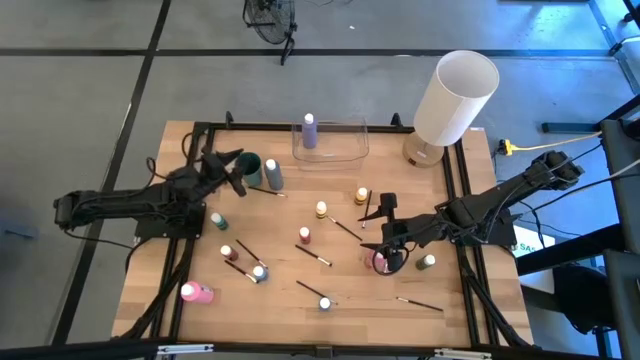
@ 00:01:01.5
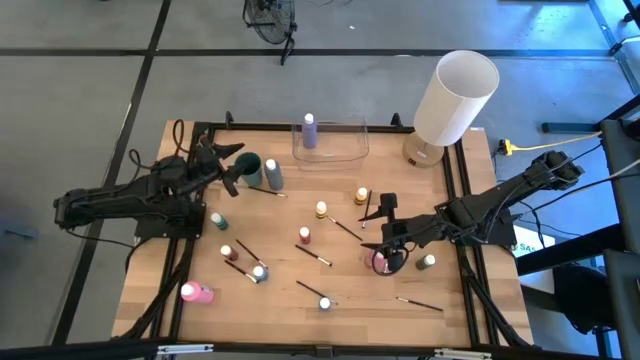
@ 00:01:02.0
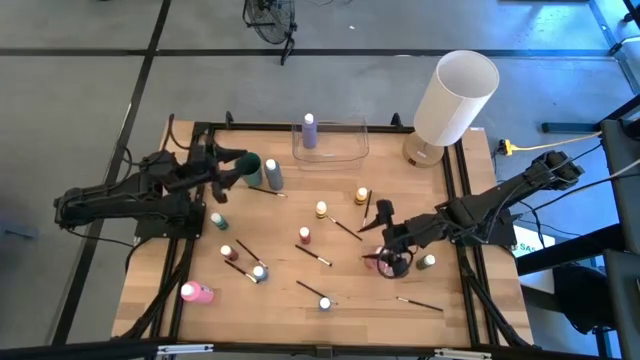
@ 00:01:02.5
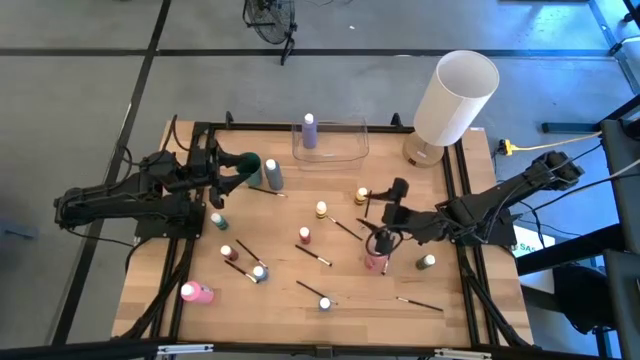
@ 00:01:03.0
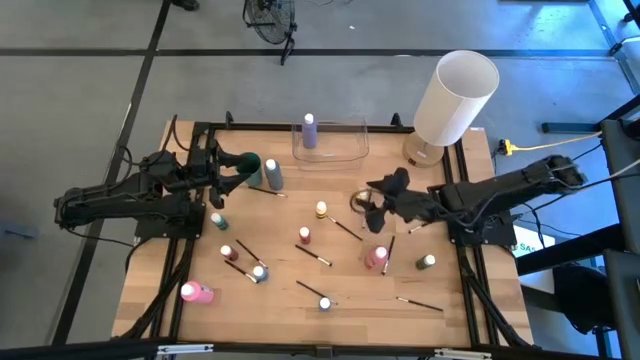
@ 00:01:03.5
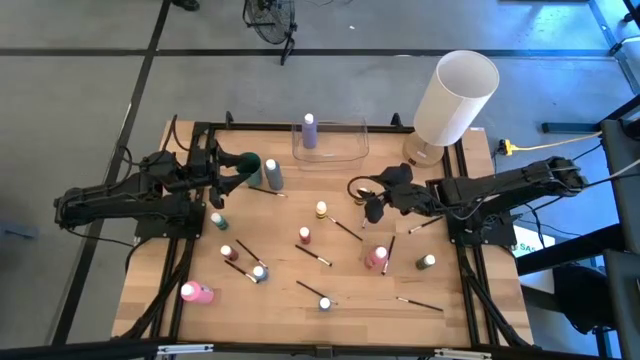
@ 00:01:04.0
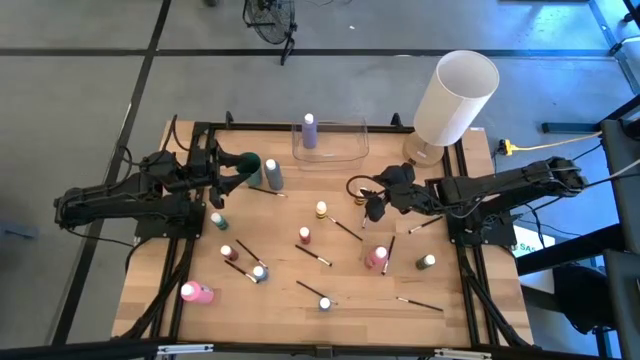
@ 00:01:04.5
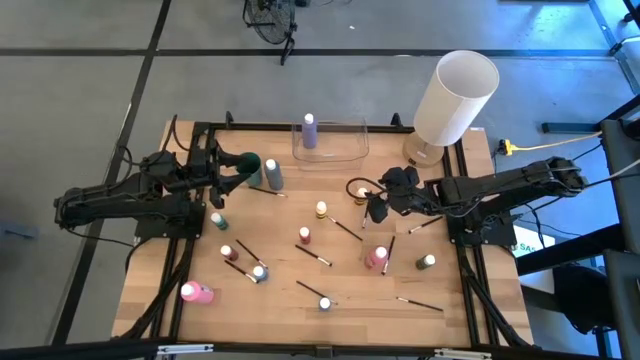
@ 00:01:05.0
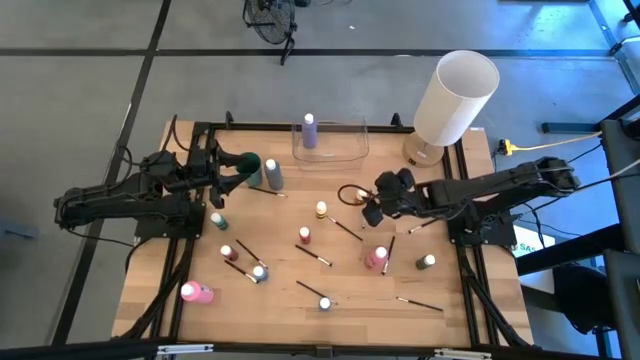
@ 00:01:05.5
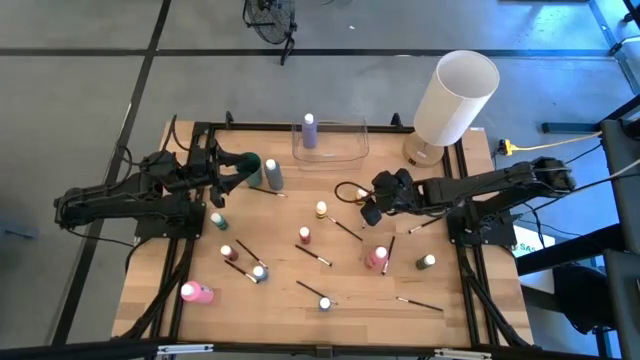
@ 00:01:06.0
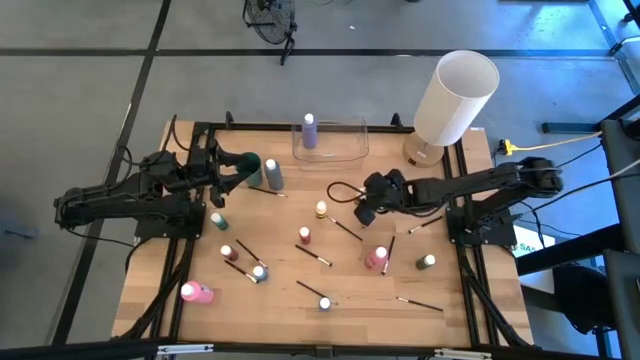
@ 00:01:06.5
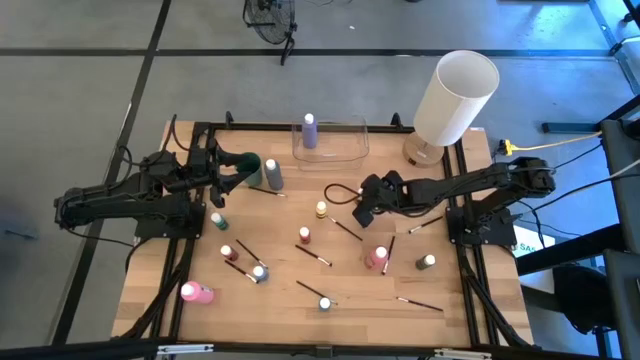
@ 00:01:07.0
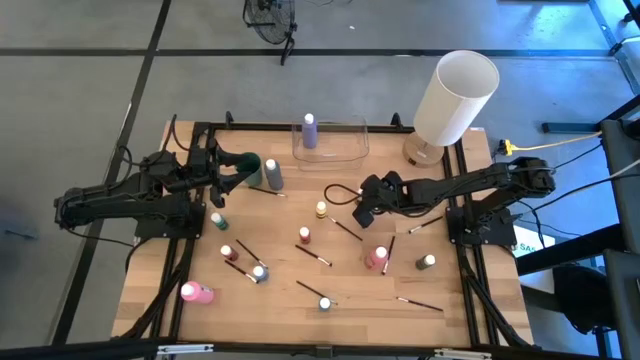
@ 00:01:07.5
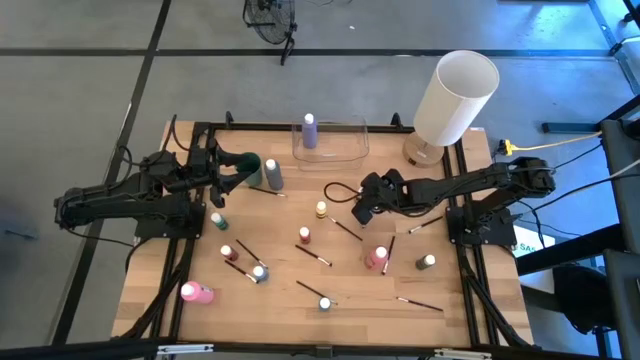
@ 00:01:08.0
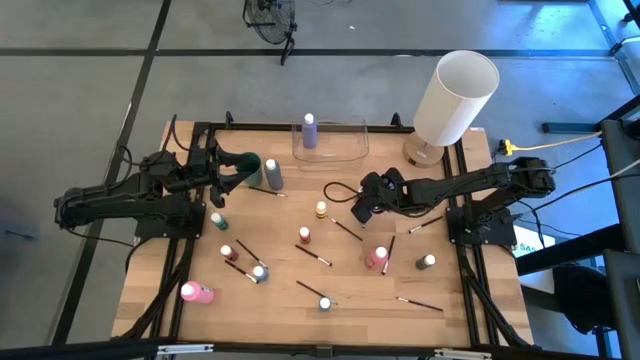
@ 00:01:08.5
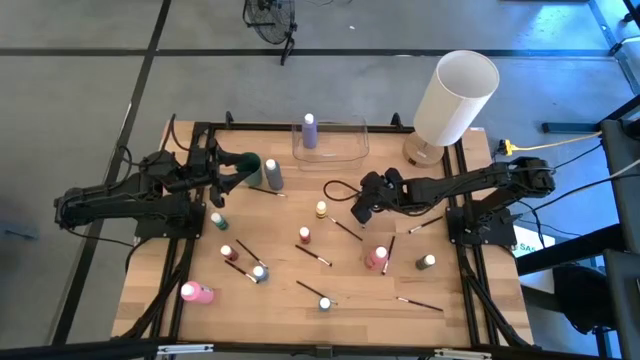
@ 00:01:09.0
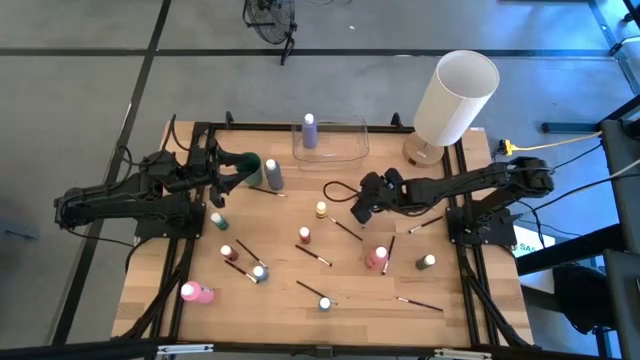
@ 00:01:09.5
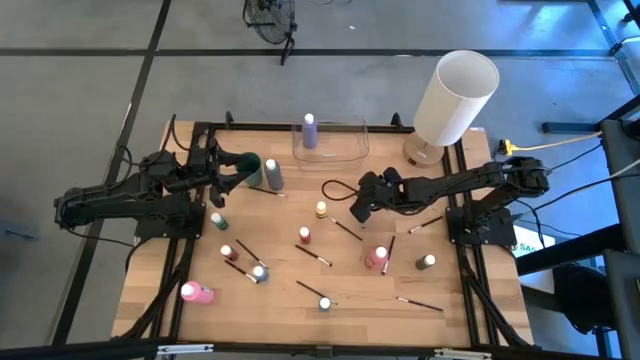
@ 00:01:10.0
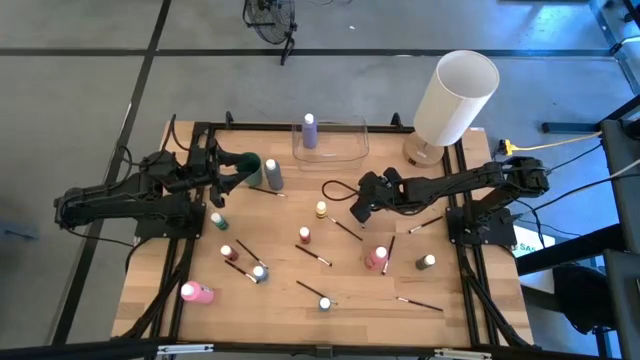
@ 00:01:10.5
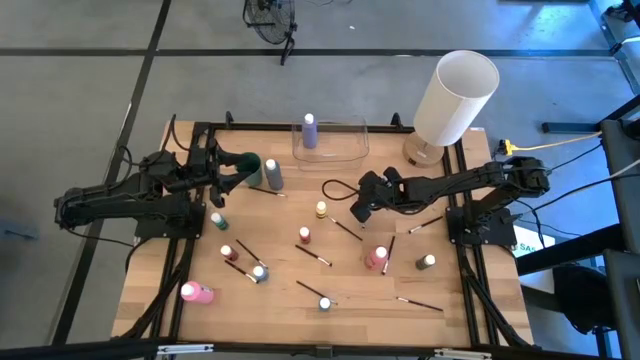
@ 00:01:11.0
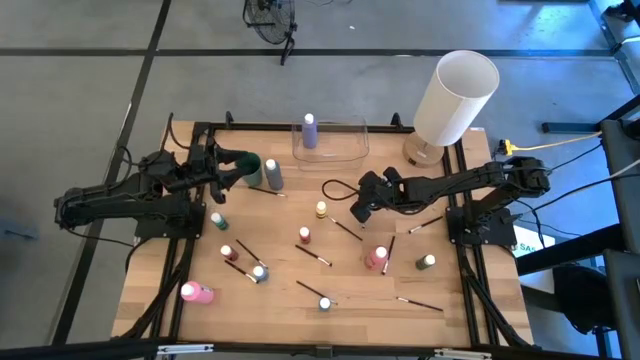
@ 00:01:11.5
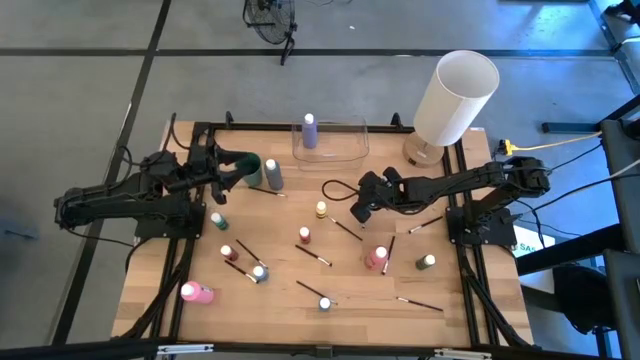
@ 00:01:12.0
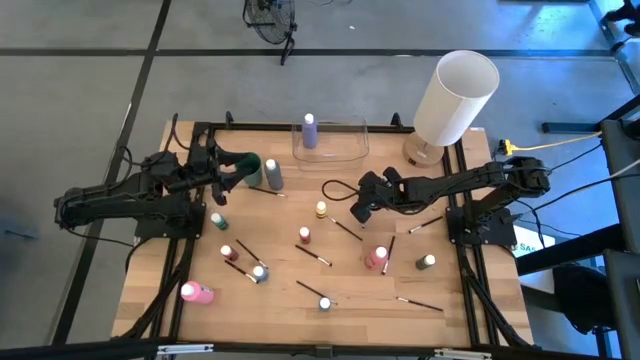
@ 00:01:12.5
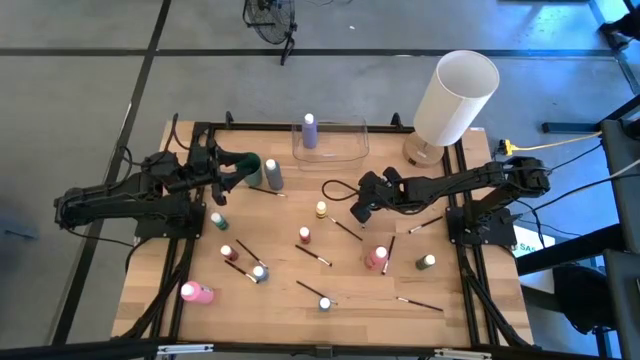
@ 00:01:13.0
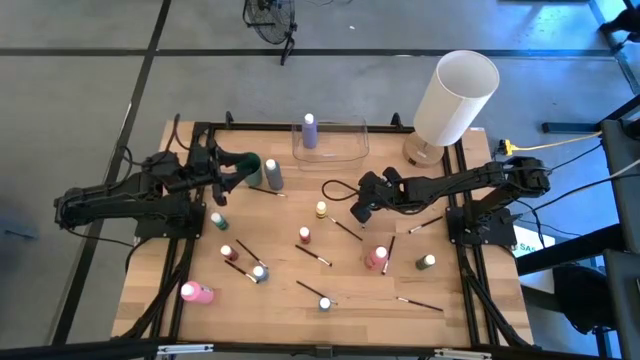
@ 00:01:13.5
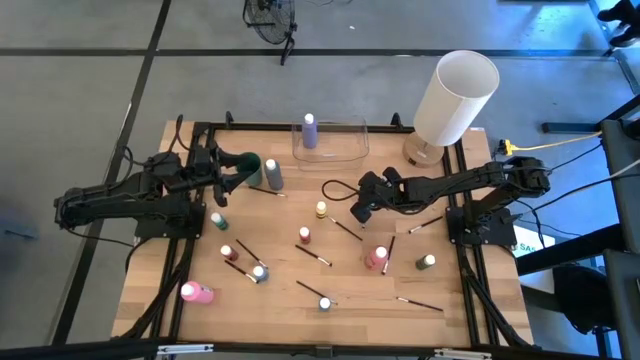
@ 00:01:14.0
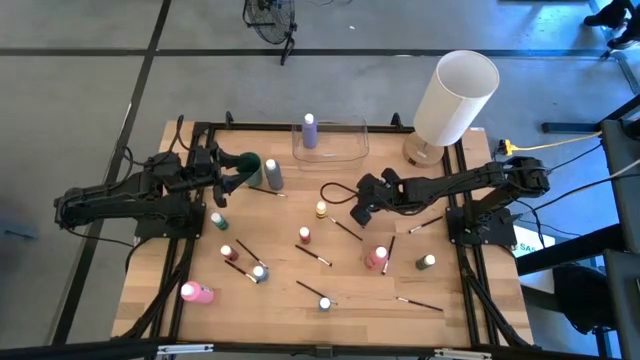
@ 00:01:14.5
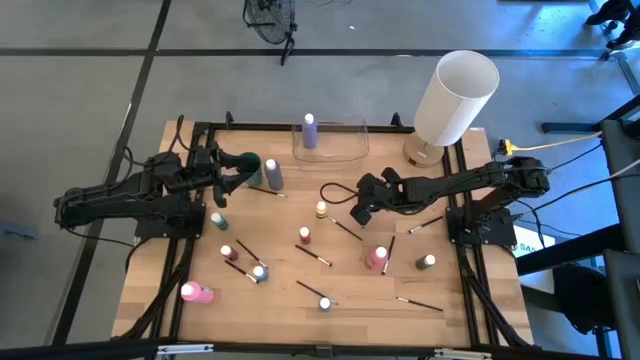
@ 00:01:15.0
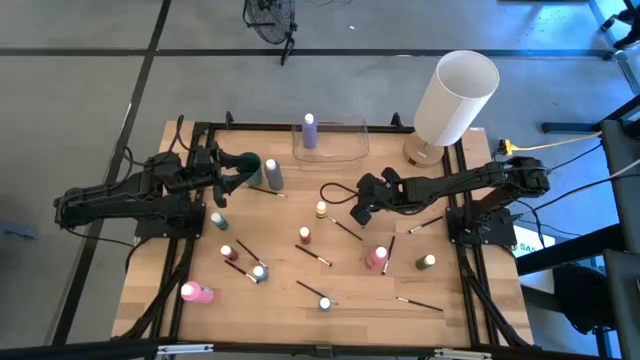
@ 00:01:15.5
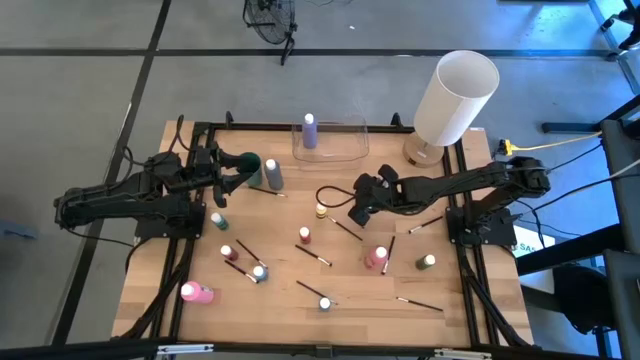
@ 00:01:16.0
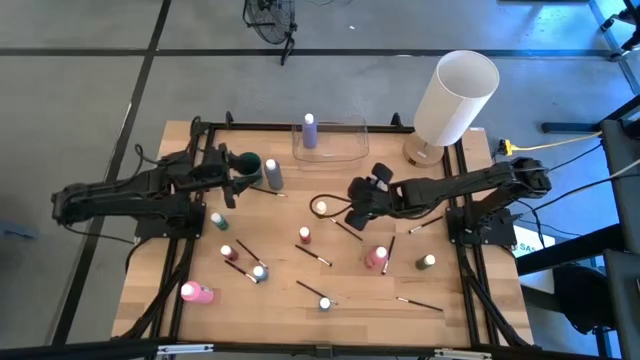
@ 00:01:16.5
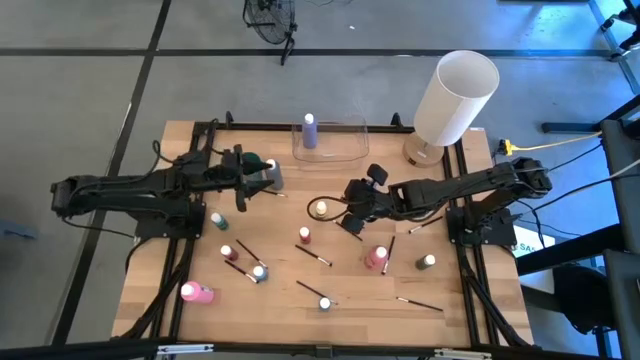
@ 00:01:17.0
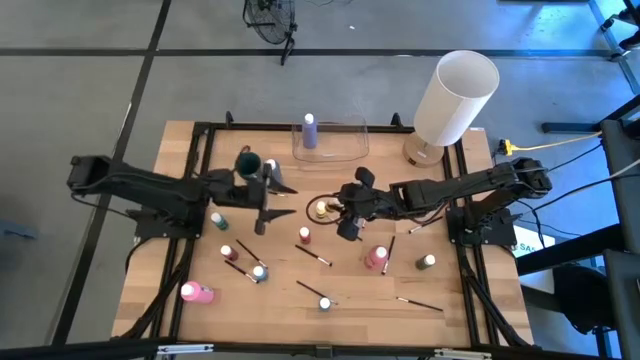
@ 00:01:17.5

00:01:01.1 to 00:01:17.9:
Task: Pick & Place Paint Supplies
Put the yellow paint bottle into the transparent bin

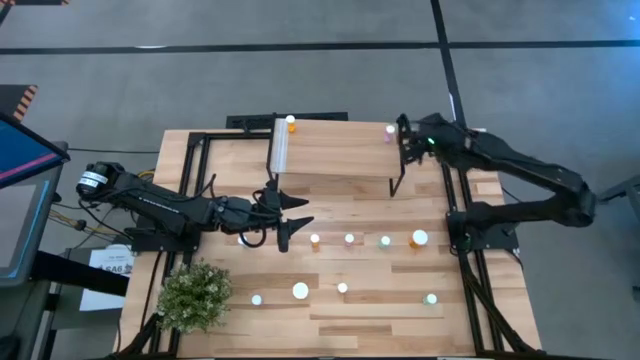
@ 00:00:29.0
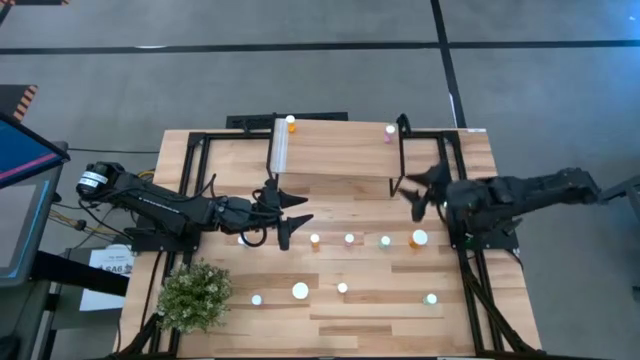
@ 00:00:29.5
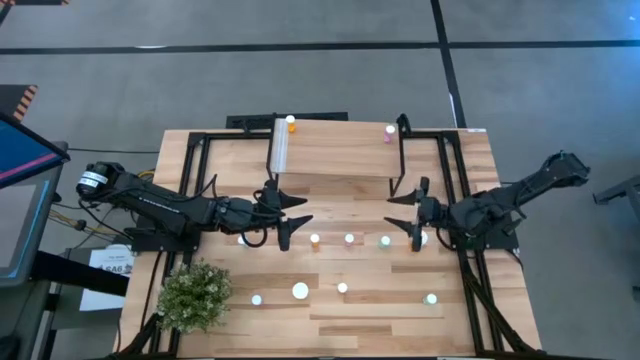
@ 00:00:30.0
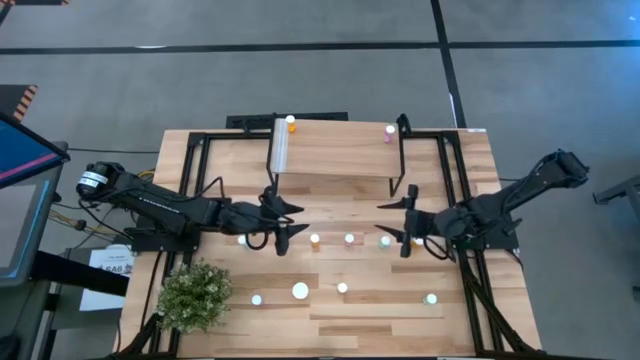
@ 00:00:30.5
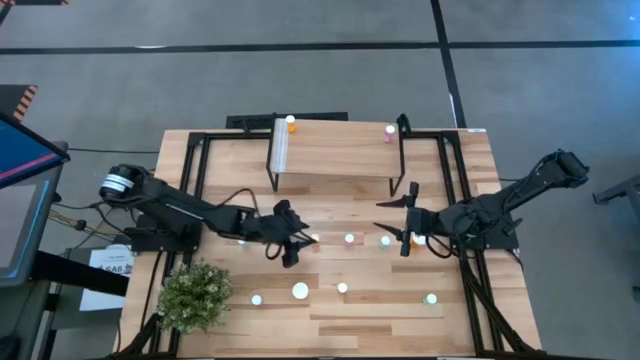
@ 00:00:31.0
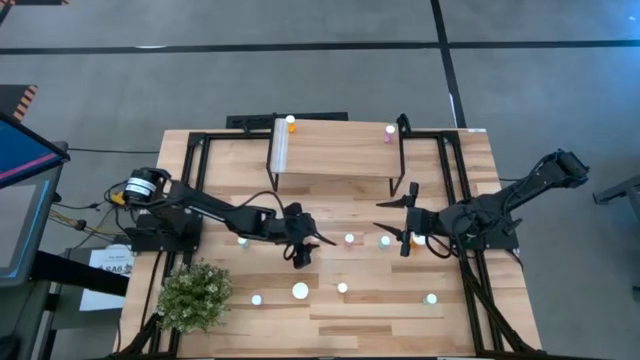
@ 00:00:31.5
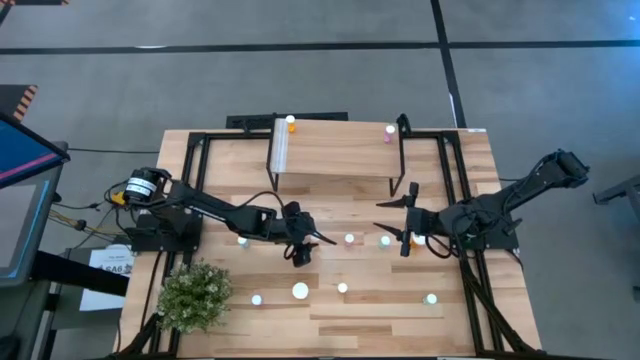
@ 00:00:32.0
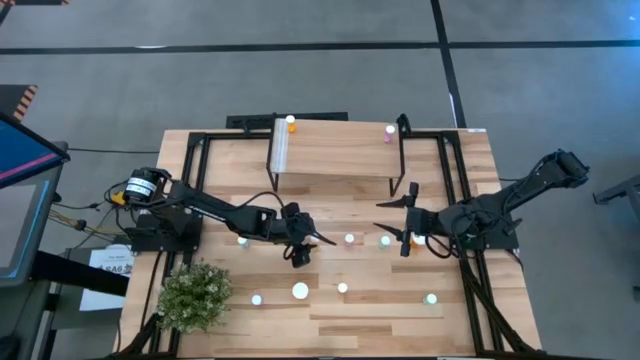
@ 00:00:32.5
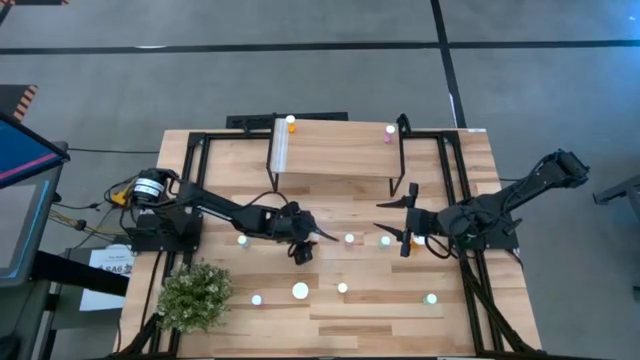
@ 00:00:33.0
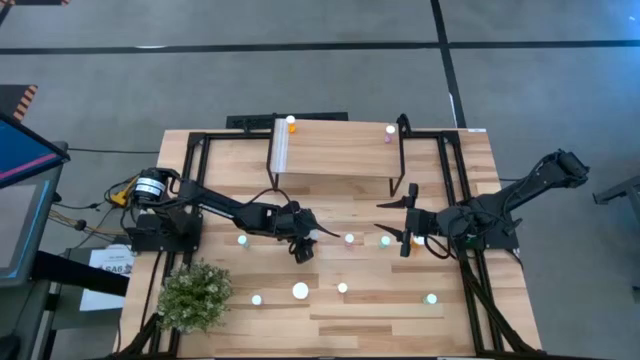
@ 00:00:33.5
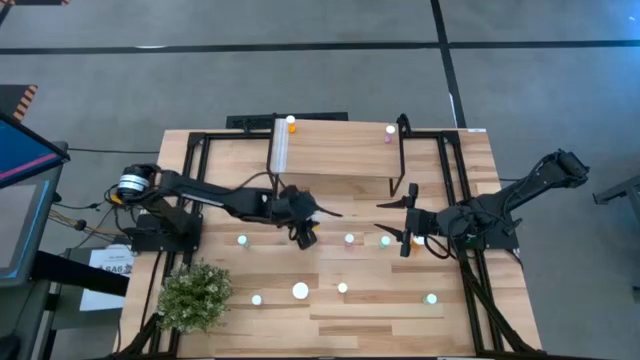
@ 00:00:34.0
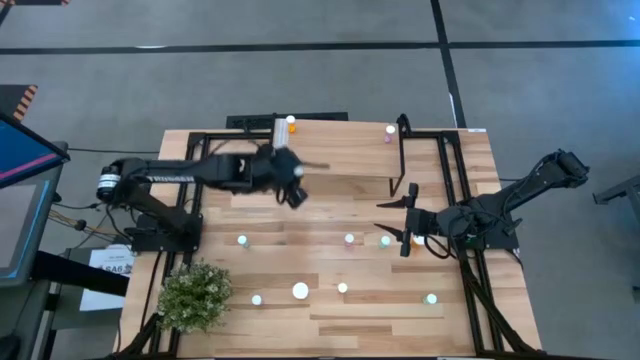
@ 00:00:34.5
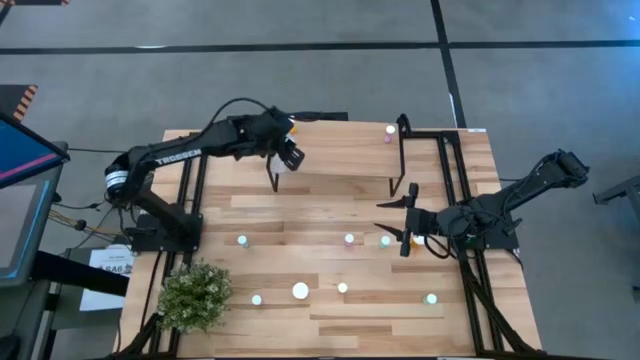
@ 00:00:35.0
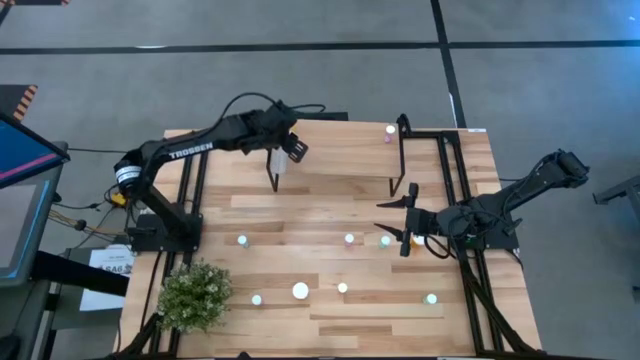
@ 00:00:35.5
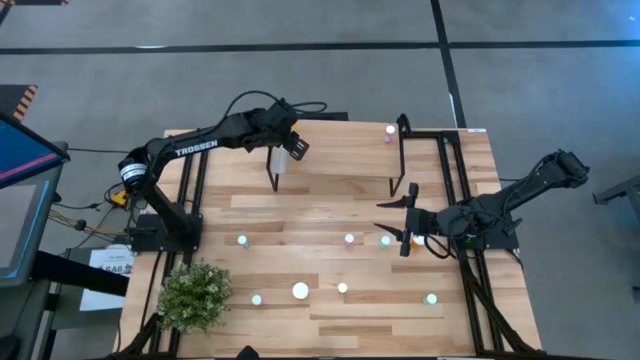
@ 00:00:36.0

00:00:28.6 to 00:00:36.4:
Task: Pick and place medicine bottles onto shelf by color
Put the top small orange pill bottle on the shelf
